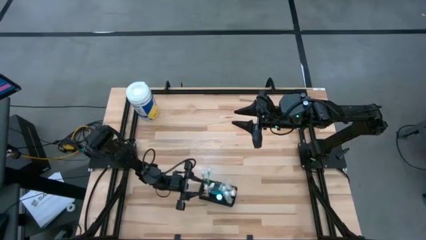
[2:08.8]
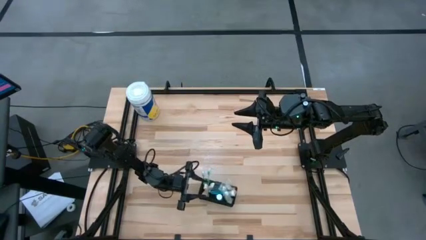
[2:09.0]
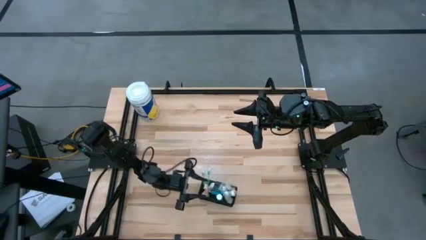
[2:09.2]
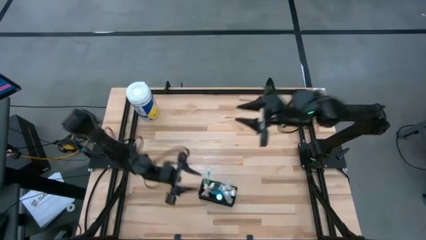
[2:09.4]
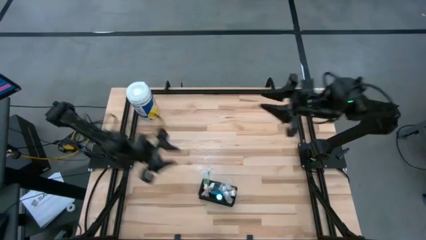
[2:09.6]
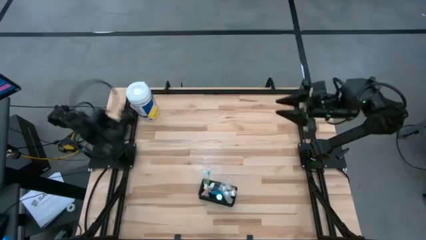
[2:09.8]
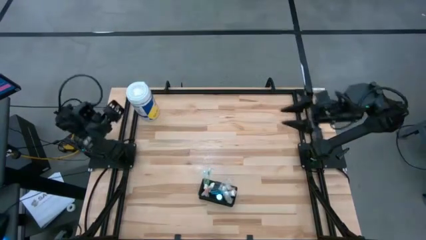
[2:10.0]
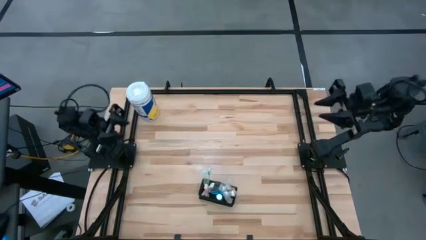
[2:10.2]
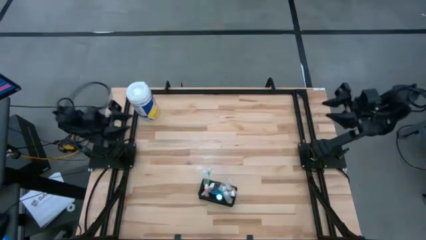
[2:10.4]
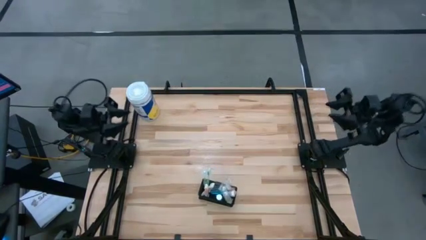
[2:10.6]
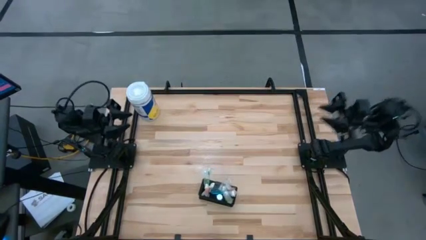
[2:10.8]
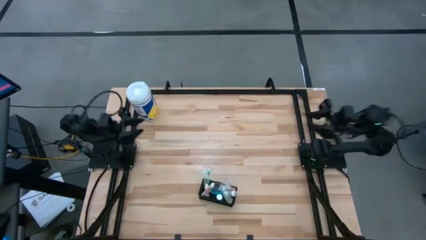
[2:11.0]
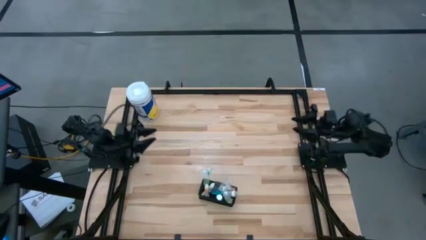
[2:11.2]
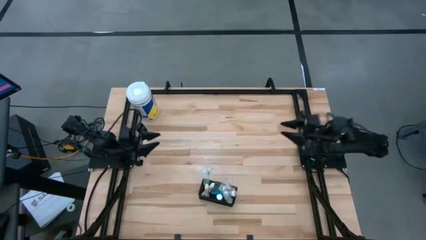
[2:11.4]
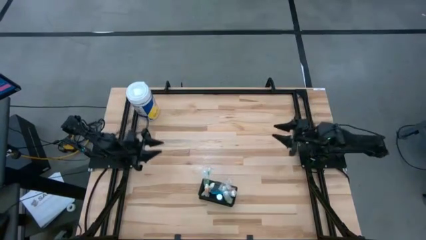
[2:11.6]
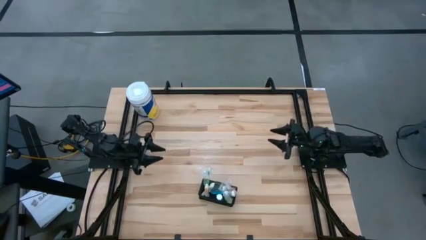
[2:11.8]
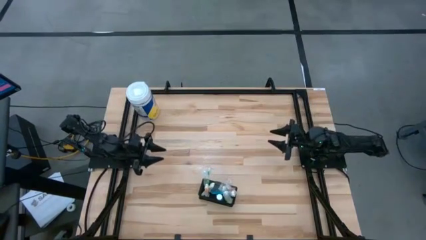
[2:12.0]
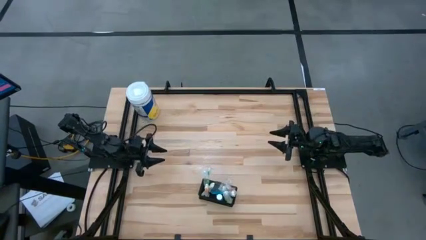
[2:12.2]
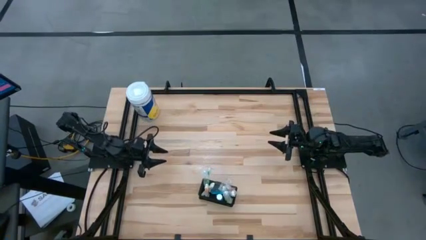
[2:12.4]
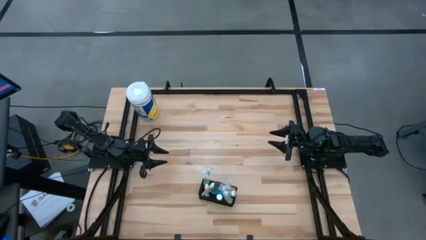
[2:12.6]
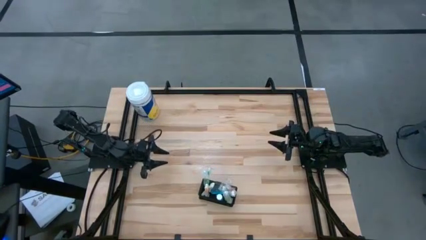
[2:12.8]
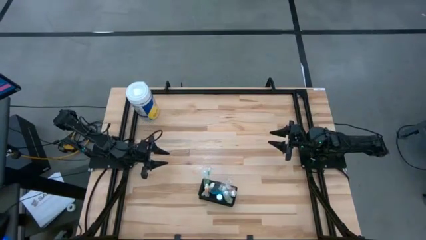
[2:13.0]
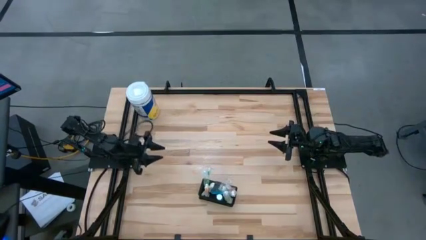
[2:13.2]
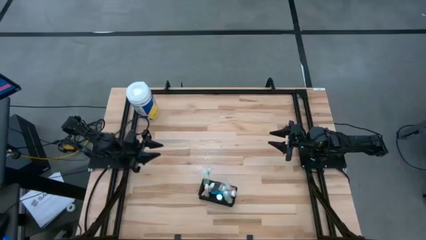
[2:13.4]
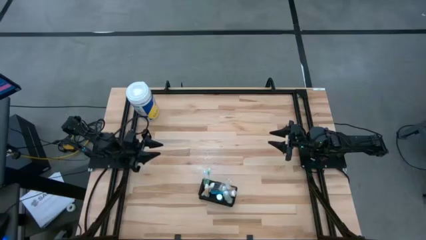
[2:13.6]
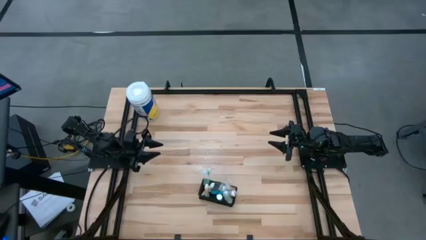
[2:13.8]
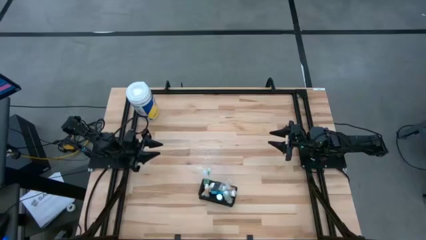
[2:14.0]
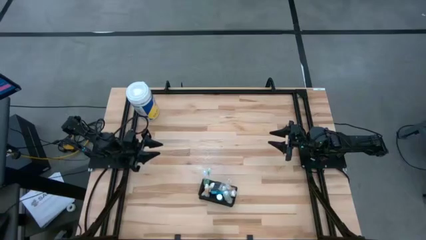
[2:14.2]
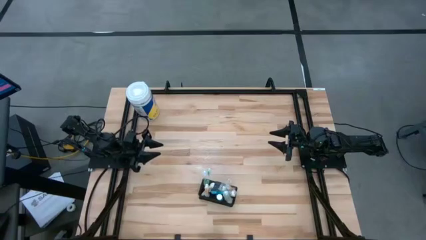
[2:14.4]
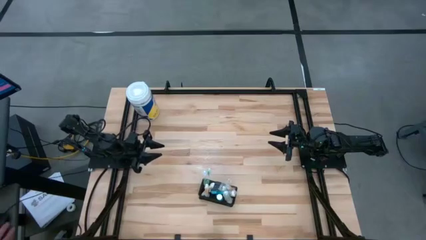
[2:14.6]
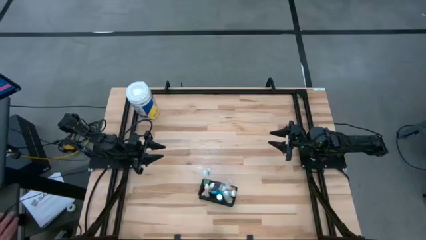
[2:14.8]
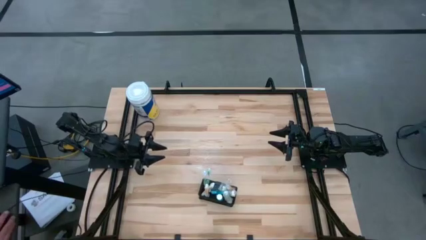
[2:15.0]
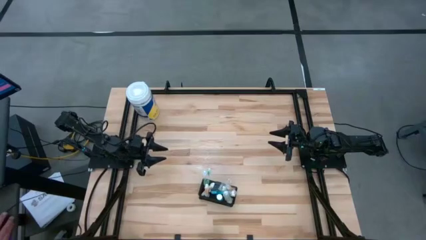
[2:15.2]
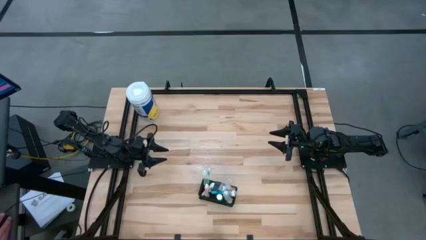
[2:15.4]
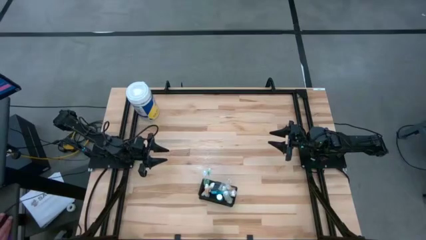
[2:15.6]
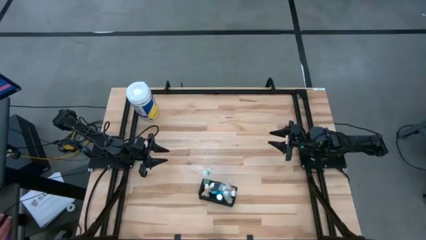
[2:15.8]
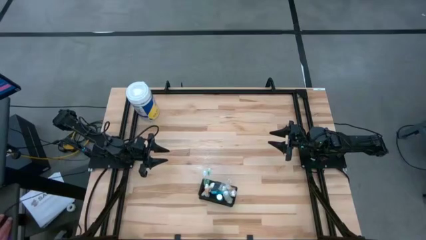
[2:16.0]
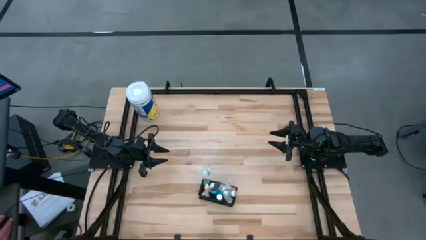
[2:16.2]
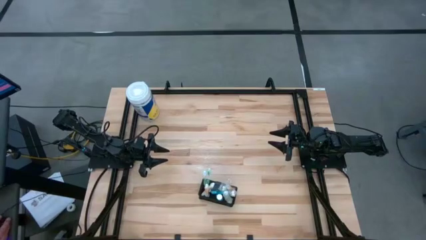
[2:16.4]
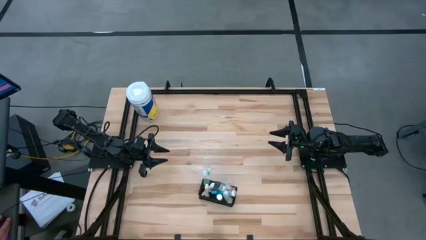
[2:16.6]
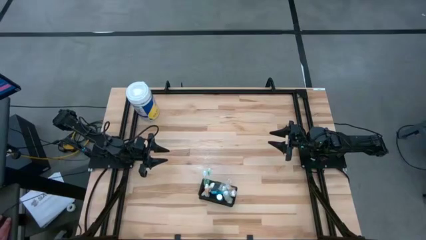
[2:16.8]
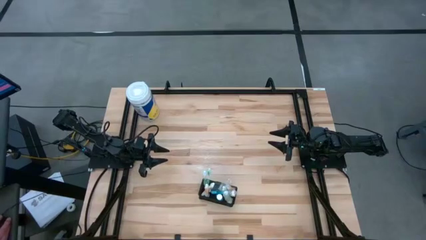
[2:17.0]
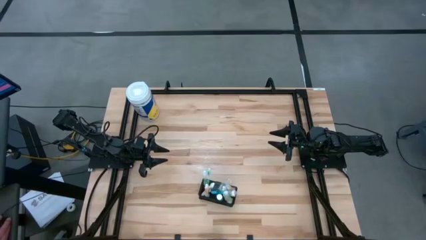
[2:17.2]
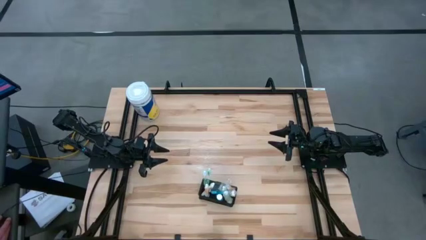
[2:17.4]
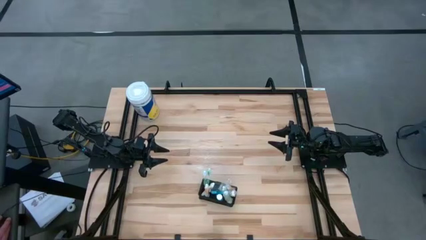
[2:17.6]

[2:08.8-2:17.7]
Task: Pick & Place toothbrushing station
Return to Home Position

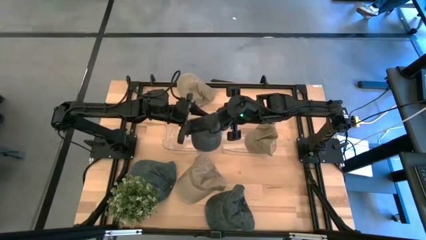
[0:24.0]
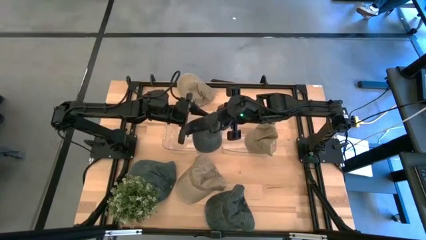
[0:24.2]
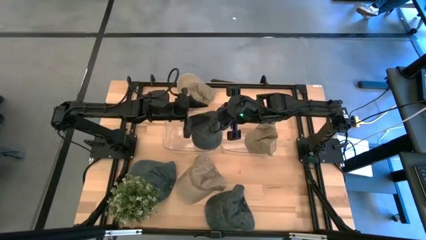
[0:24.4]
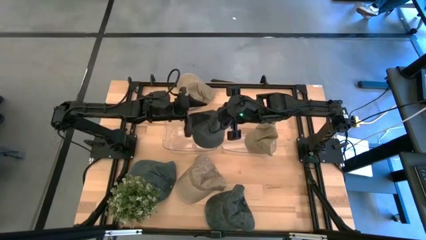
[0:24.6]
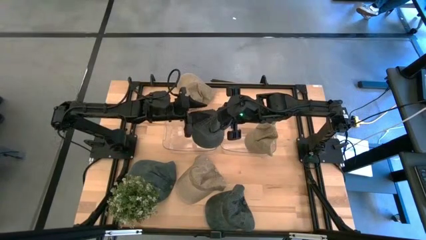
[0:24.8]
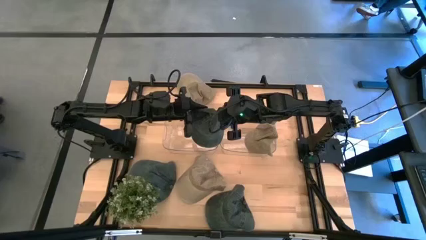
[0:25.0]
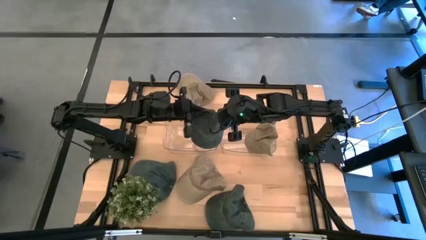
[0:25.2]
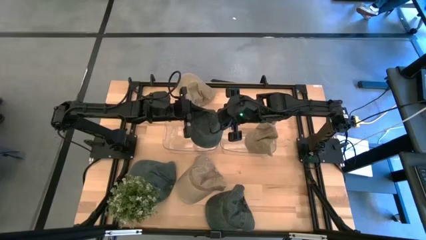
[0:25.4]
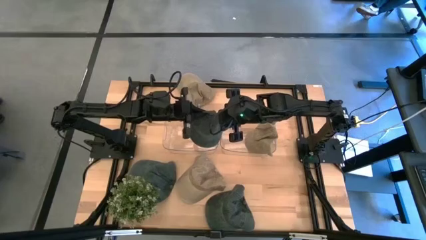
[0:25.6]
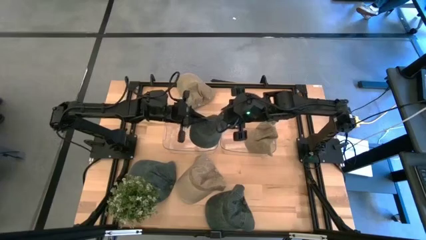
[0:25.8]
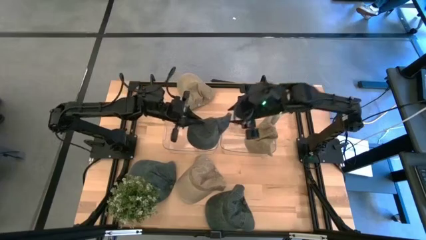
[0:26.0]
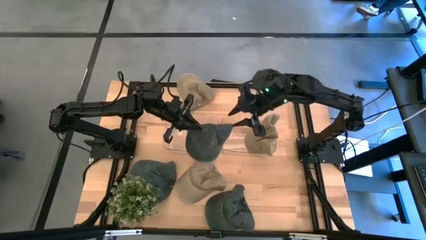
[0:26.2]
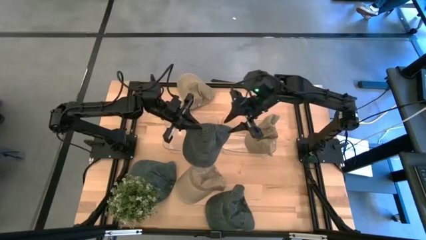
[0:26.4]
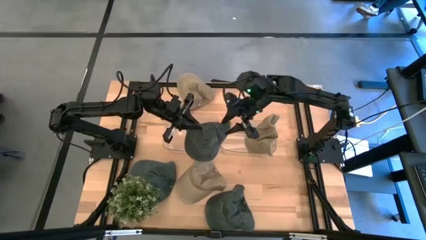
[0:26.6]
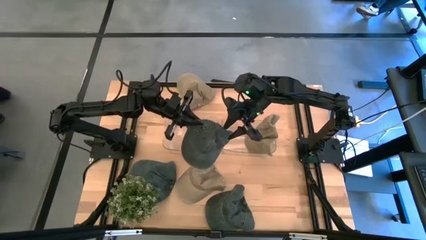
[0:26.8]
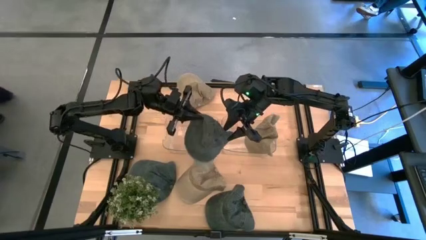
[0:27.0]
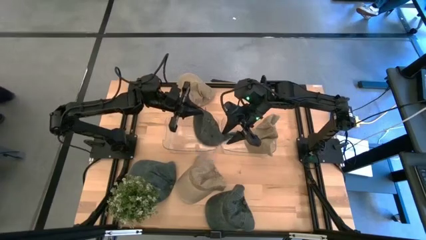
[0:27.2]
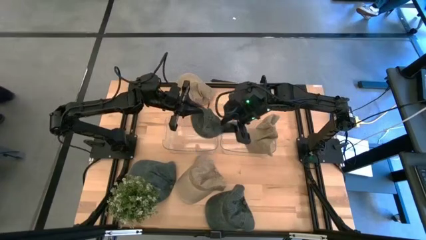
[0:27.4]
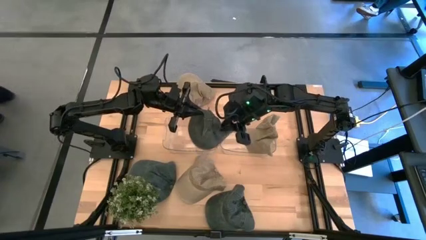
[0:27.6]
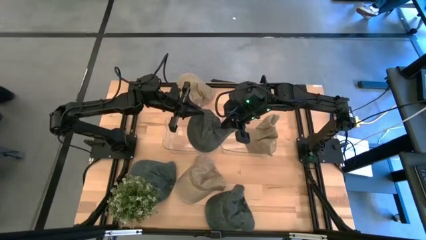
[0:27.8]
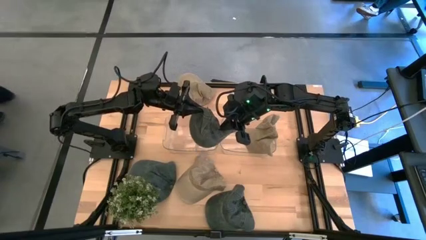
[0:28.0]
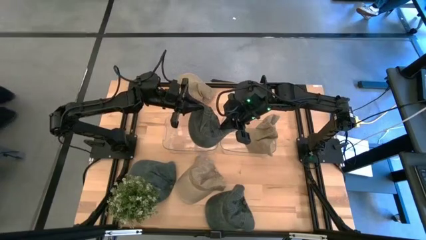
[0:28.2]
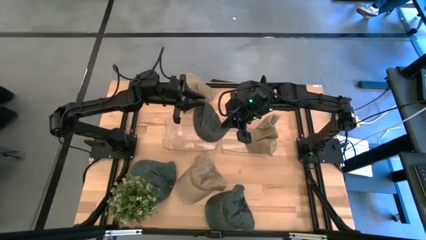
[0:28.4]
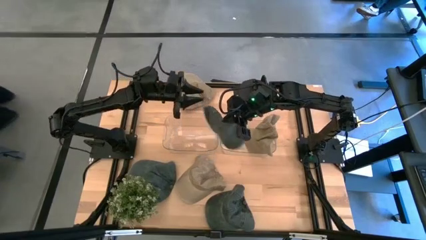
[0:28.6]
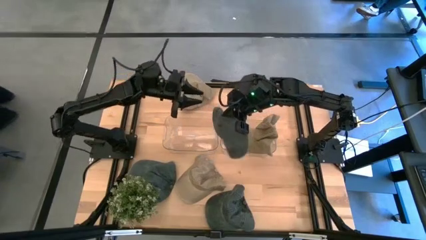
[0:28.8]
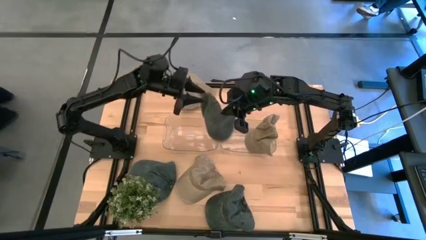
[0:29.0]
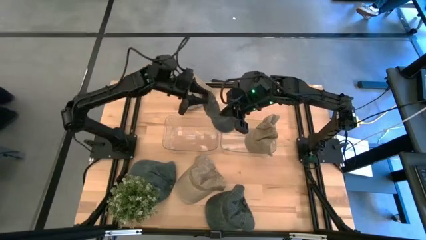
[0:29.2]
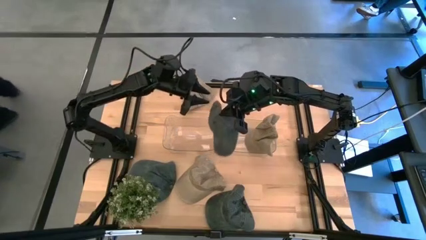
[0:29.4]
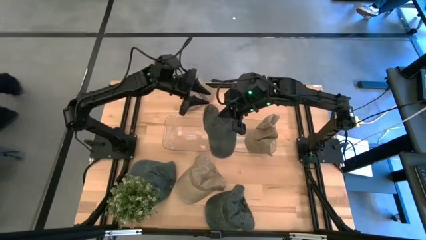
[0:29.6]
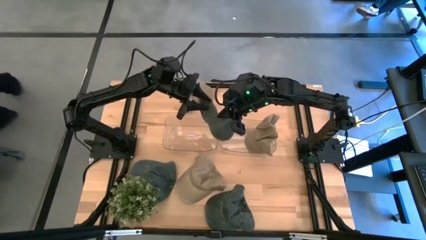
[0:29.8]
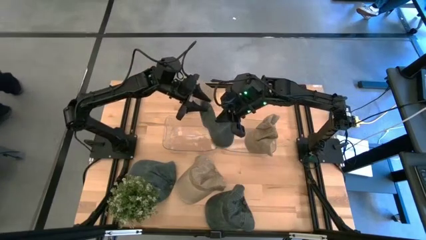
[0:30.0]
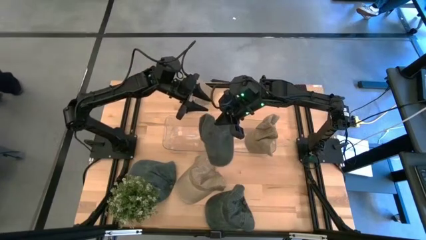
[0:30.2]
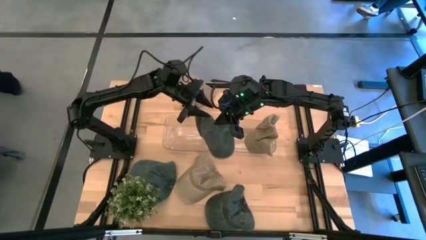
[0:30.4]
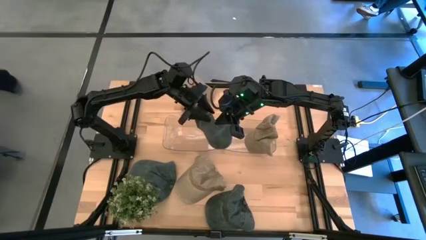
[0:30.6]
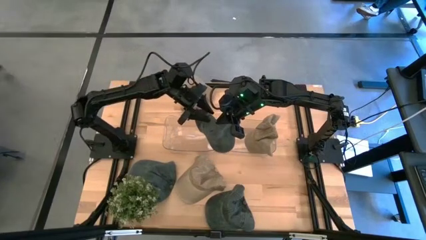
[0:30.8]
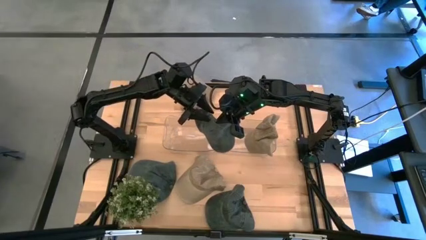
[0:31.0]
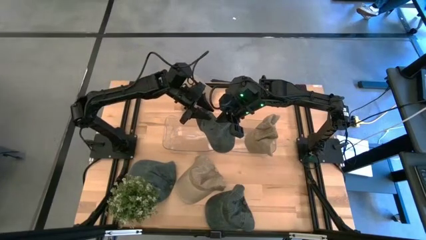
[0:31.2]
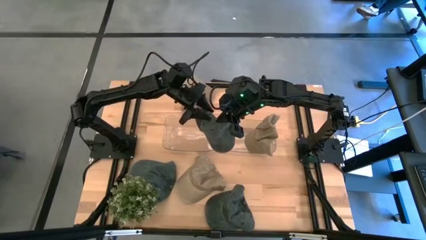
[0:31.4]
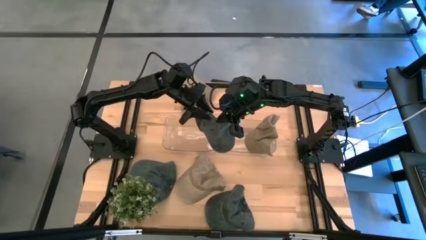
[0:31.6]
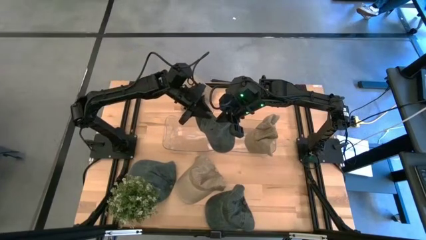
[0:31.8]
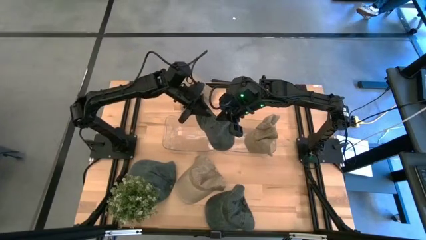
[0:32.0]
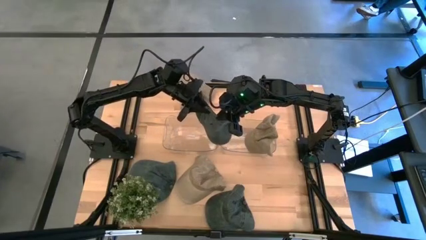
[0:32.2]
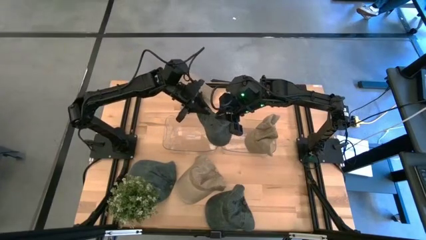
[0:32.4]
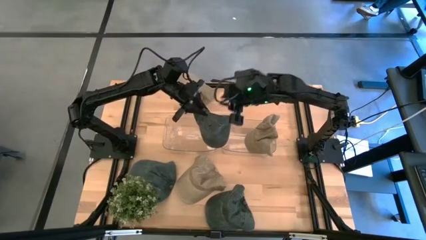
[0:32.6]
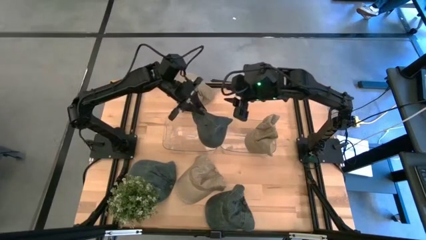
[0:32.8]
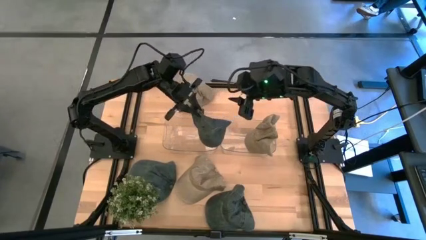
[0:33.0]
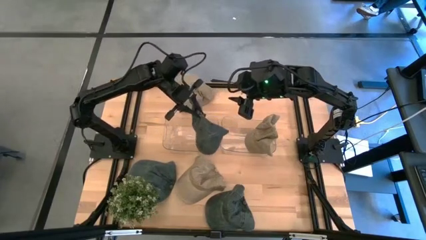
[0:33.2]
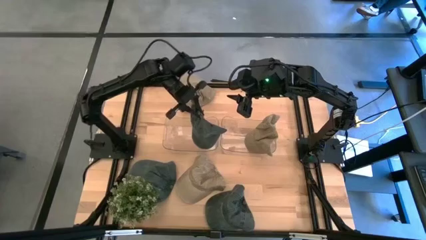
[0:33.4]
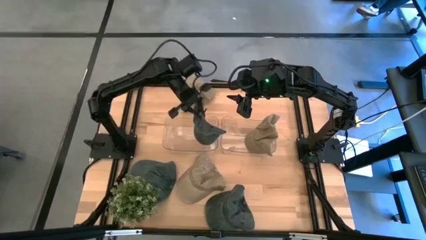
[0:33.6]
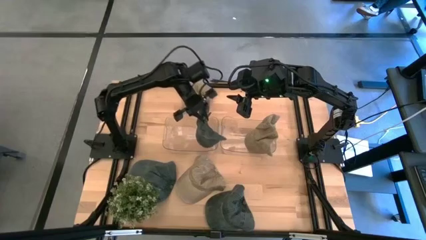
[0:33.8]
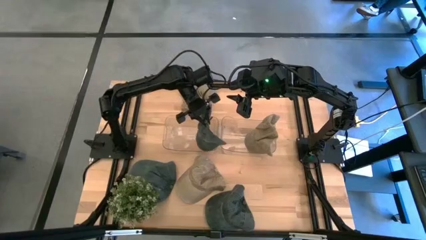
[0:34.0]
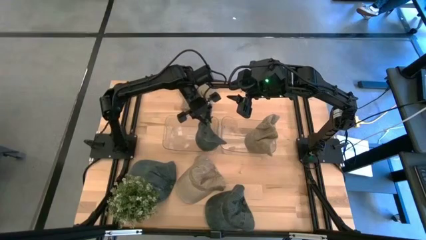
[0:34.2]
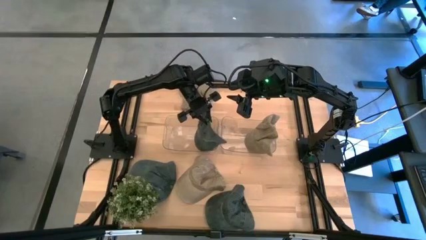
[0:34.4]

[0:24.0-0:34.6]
Task: Pick & Place hat
Put the top blue cap into the left transparent bin
